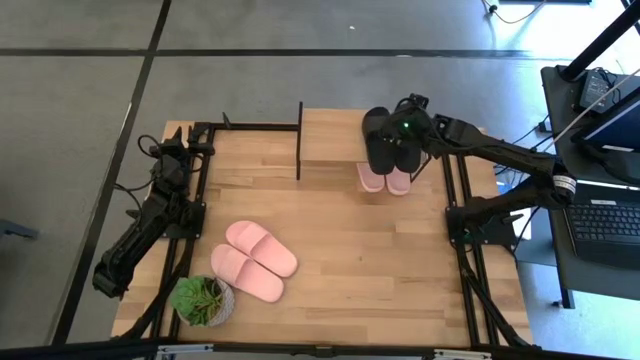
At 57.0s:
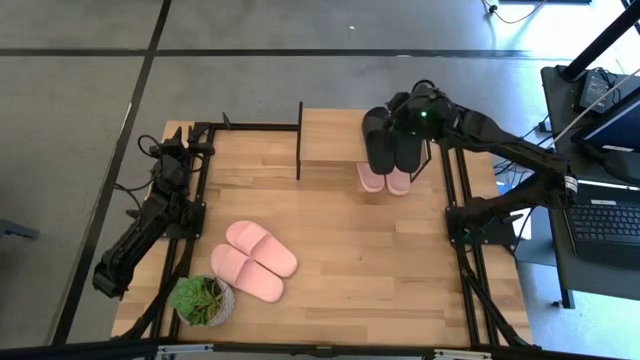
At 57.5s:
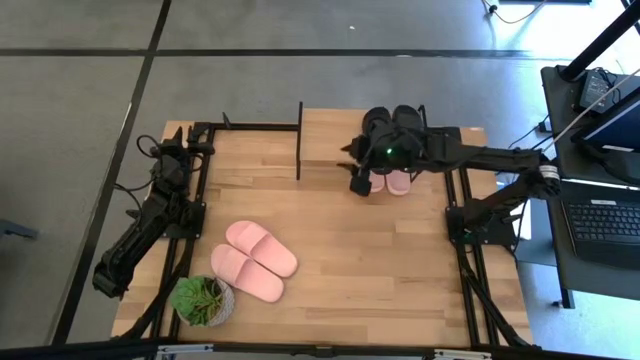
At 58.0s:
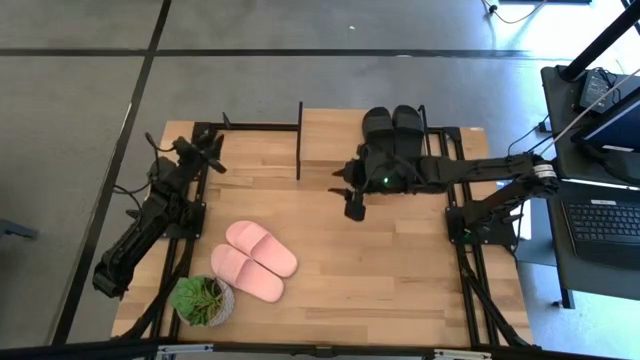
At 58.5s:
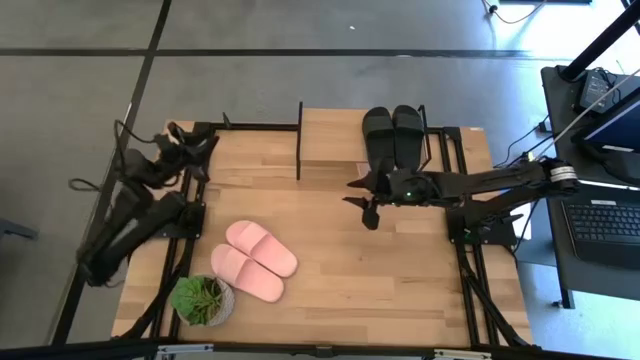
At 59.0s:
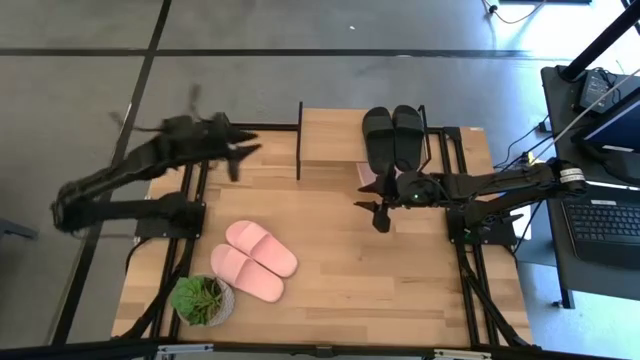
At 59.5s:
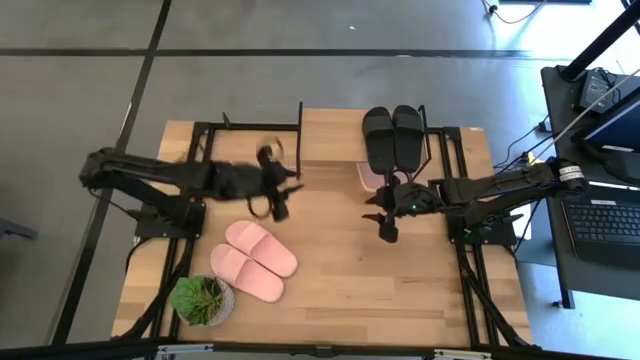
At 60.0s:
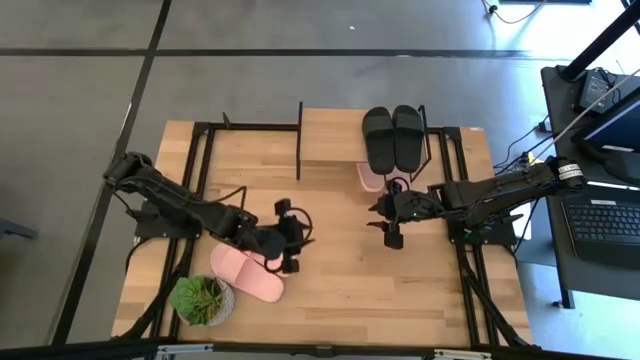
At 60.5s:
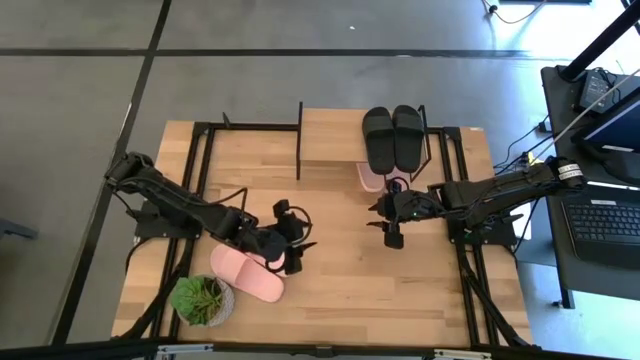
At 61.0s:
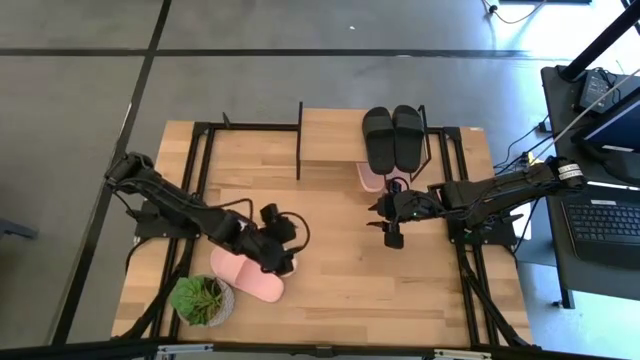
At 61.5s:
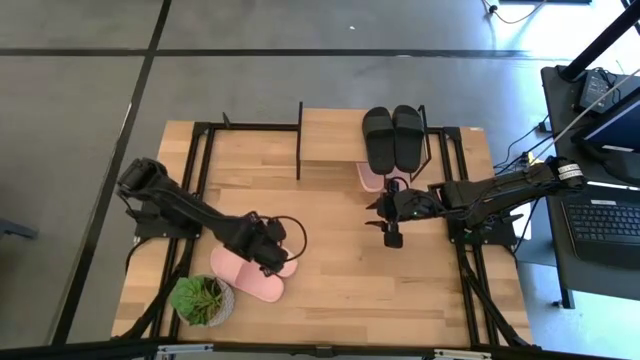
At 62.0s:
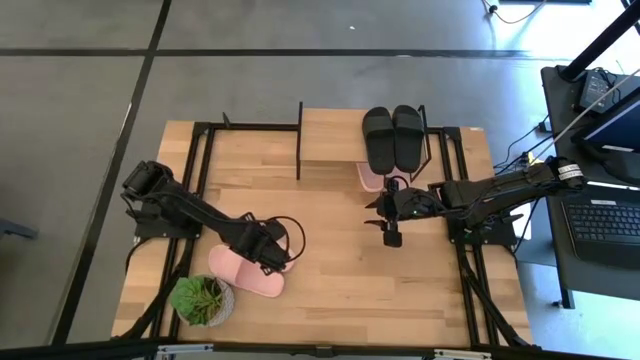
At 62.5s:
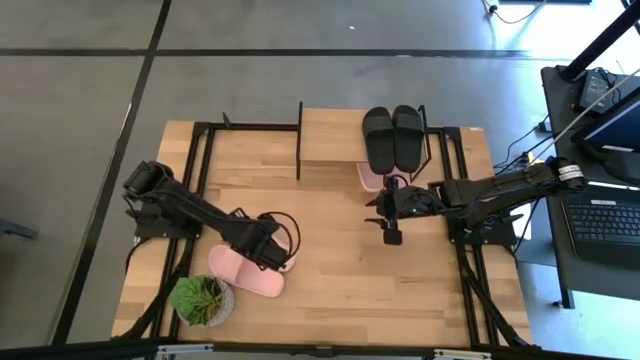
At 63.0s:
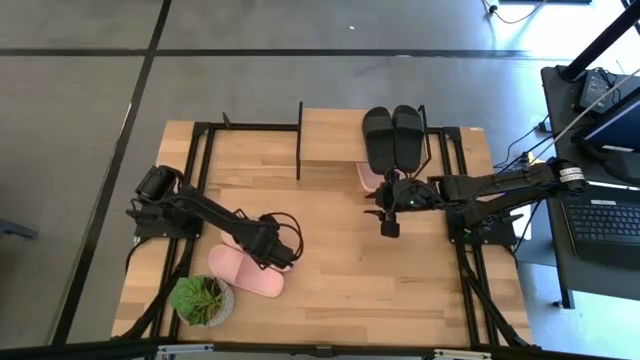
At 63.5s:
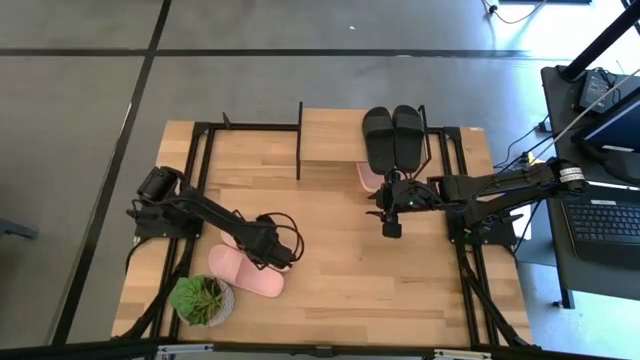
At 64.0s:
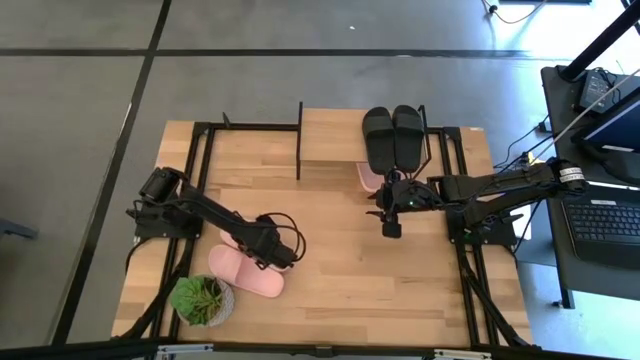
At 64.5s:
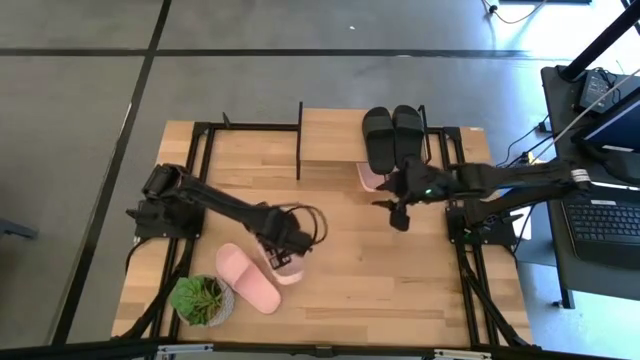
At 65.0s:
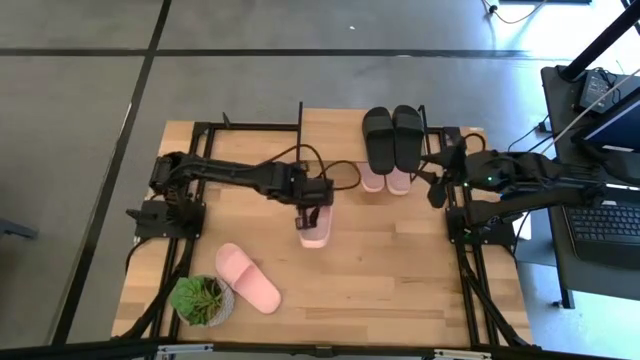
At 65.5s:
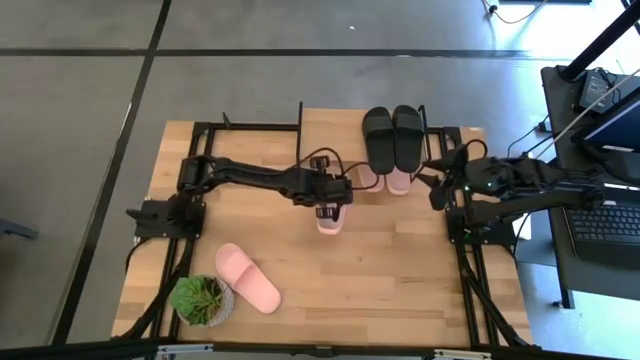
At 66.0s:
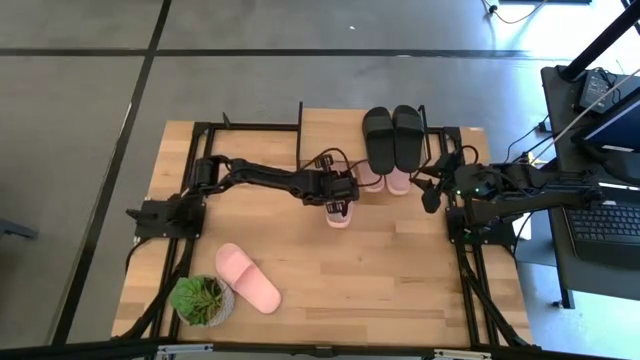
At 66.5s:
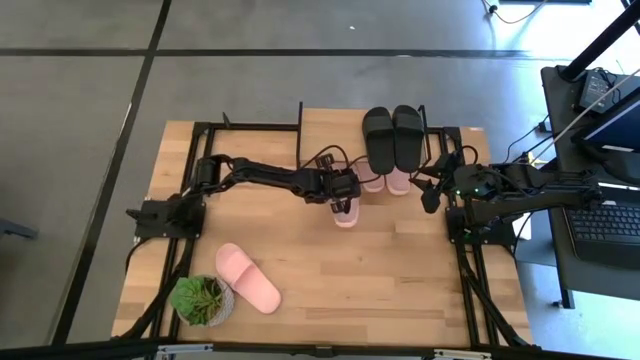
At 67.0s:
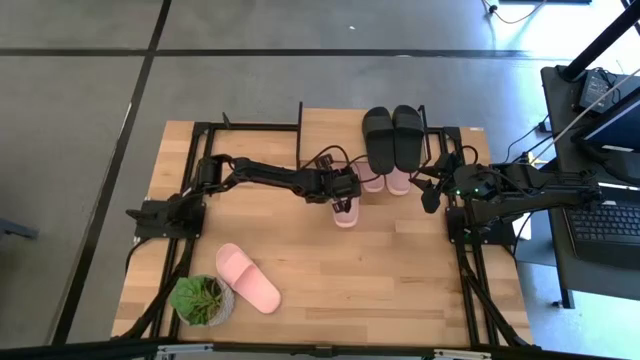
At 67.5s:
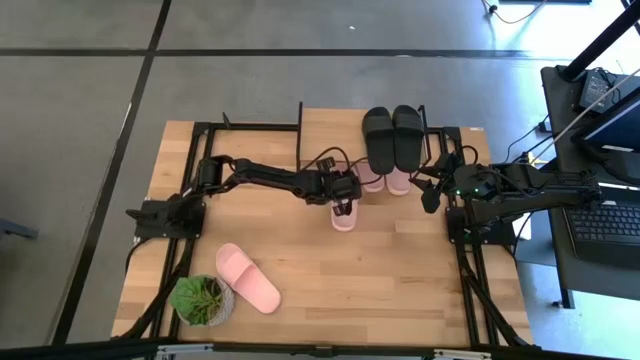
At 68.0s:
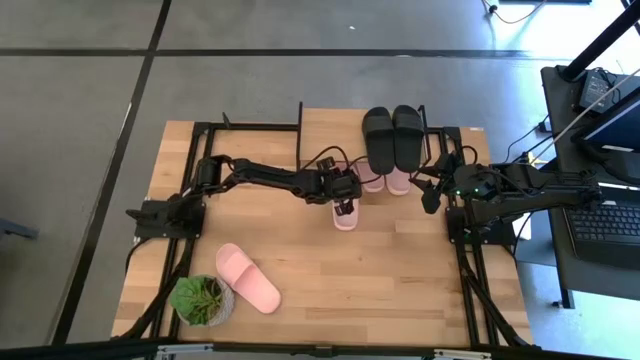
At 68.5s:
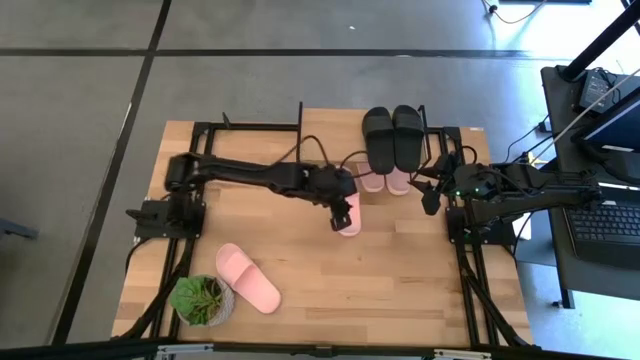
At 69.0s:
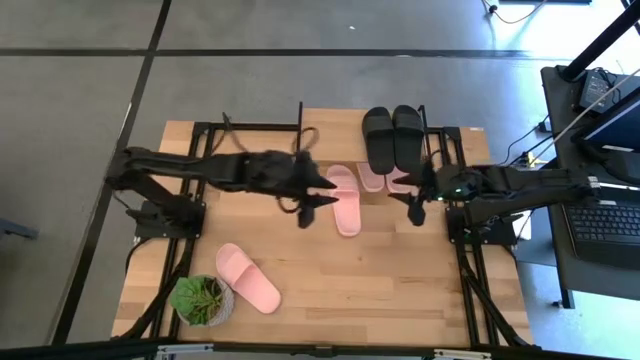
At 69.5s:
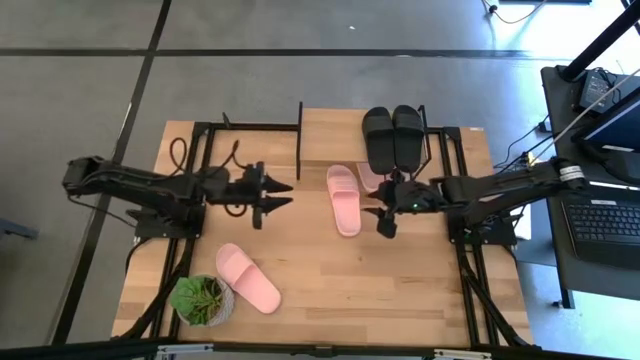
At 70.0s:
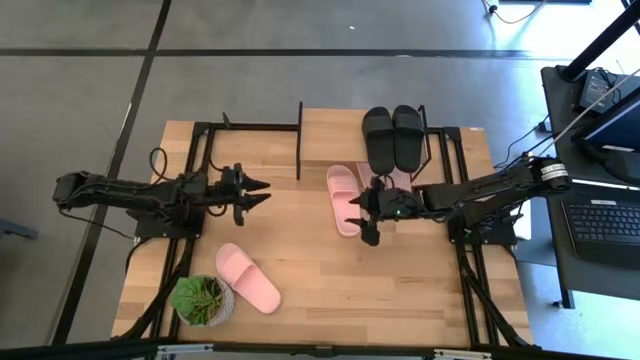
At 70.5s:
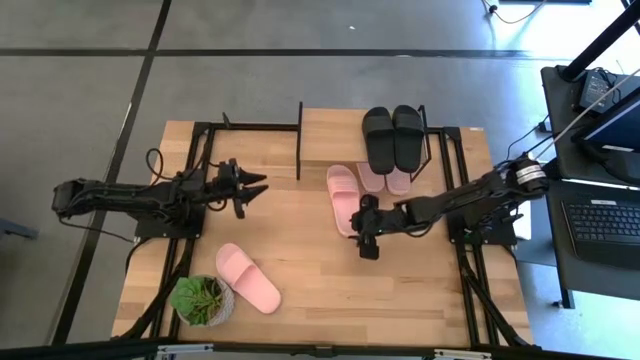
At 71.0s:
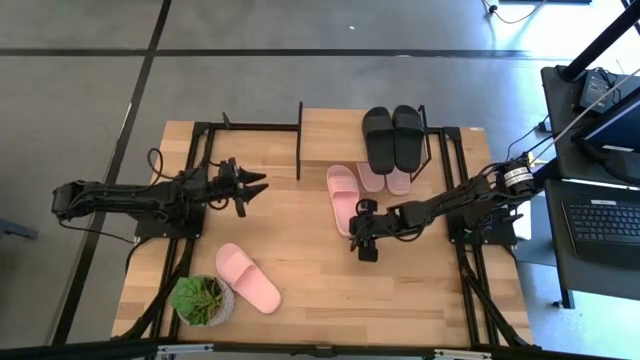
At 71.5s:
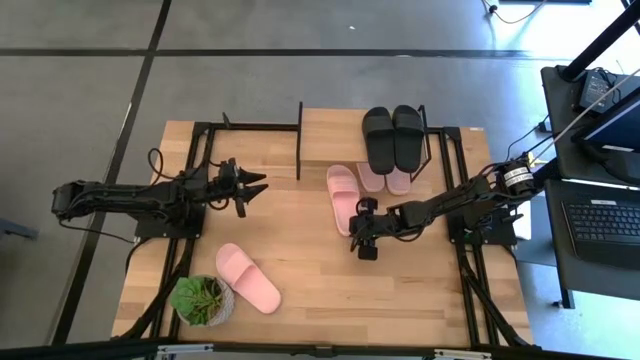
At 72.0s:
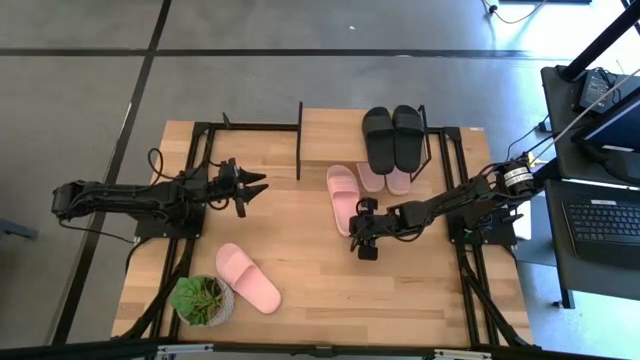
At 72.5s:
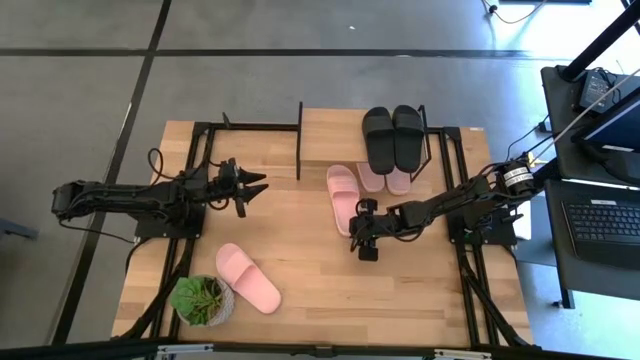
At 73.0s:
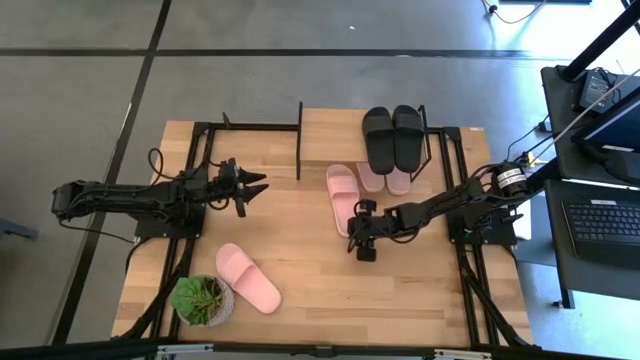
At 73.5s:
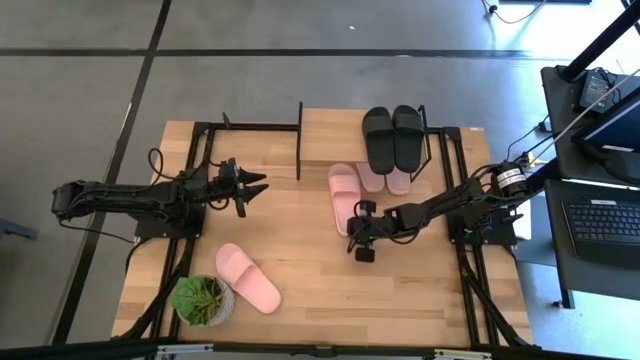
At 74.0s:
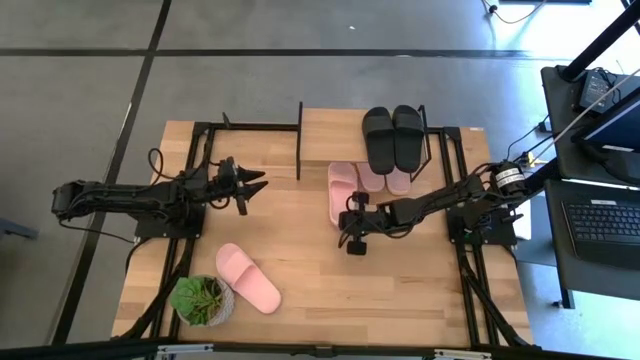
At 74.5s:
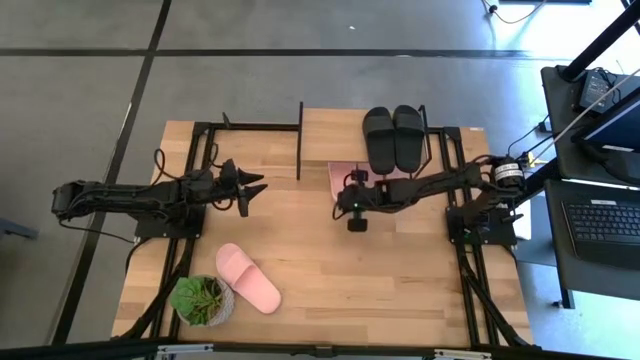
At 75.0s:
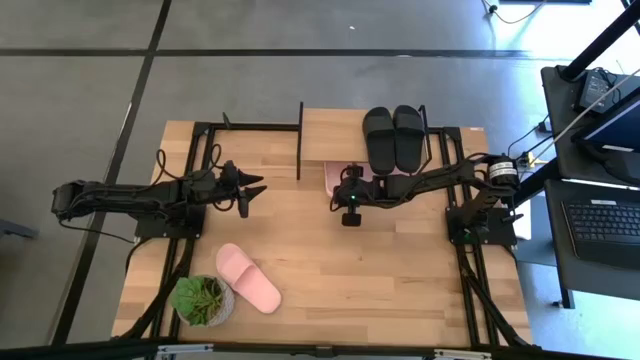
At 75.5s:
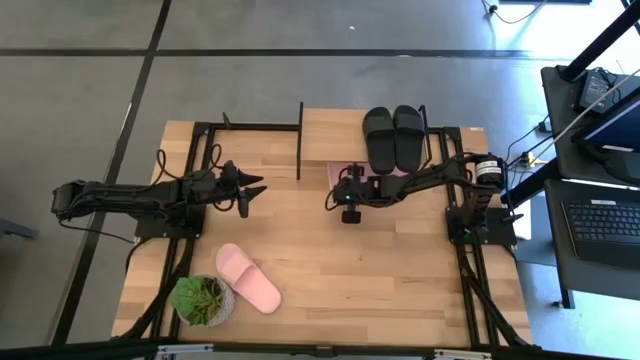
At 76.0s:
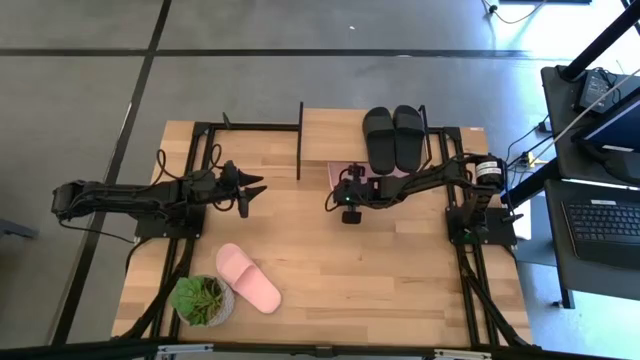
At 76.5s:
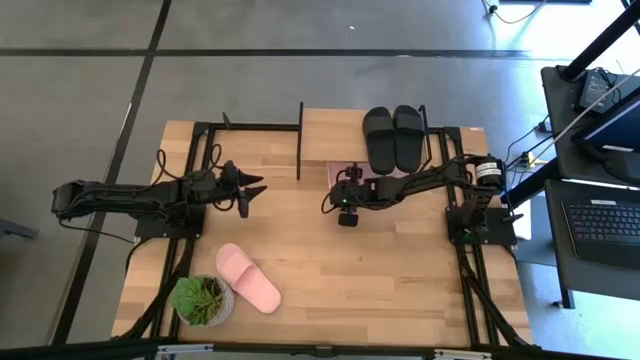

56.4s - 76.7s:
Task: Pick and place slides into the shelf
Put the pink slipper under the shelf

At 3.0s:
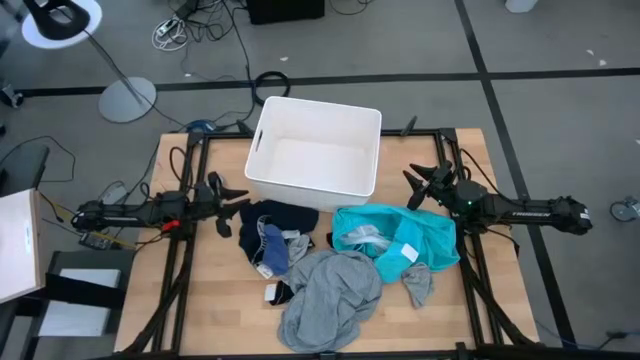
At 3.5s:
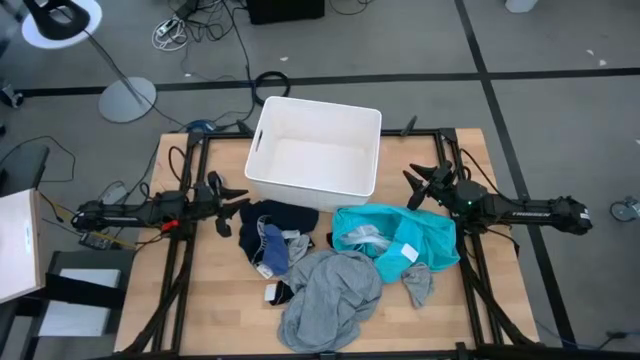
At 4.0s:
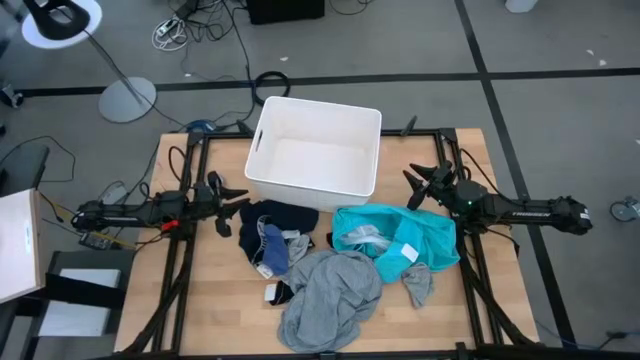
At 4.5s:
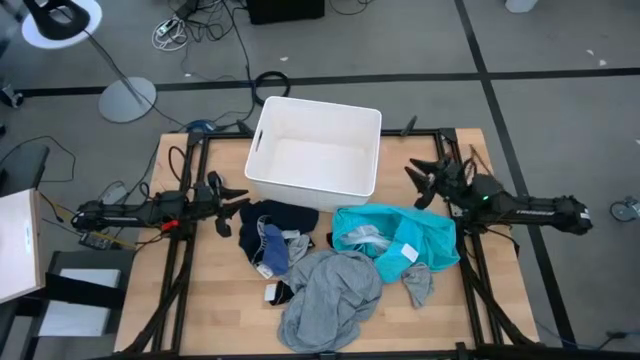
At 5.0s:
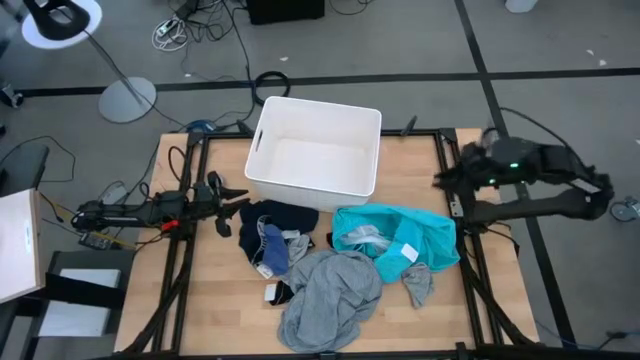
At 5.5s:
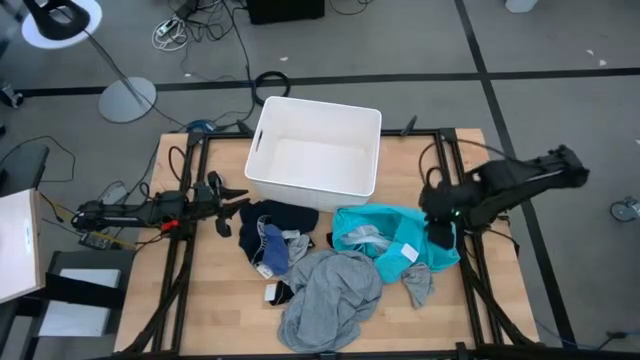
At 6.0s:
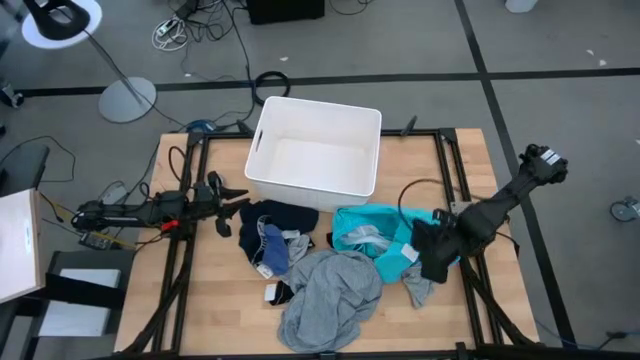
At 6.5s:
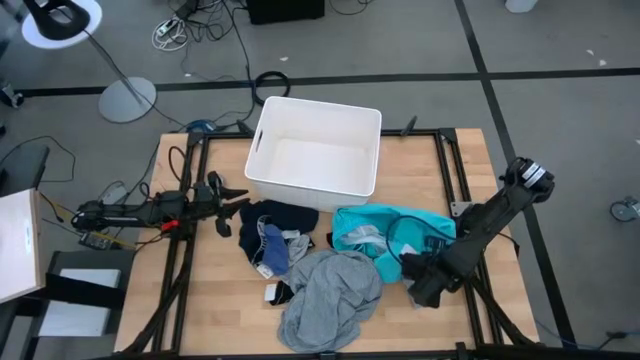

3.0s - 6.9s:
Task: Sort clothes
Put the gray sock into the laundry bin
